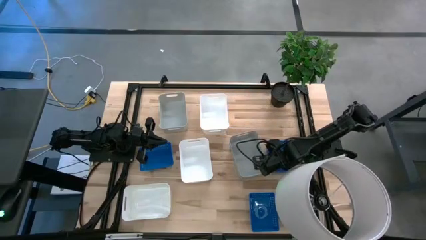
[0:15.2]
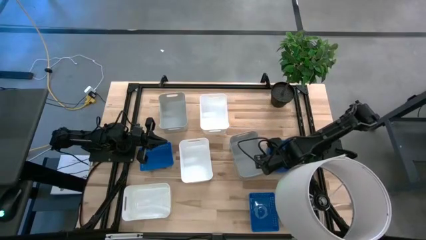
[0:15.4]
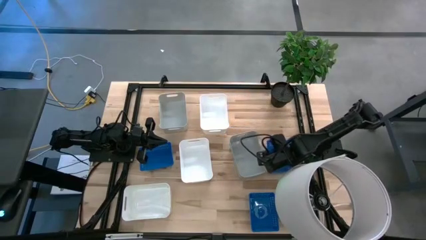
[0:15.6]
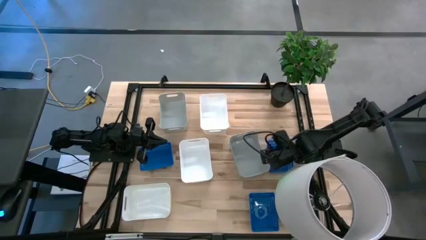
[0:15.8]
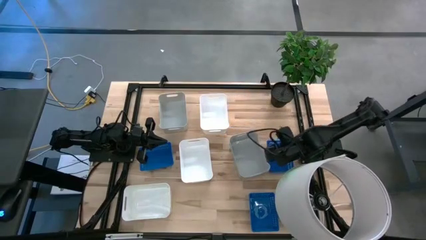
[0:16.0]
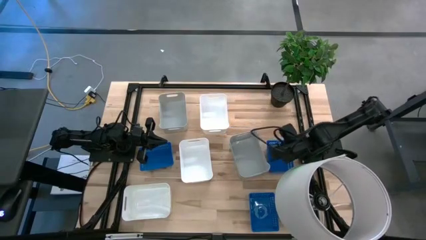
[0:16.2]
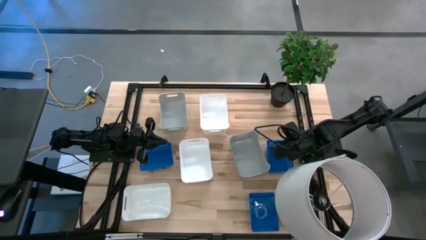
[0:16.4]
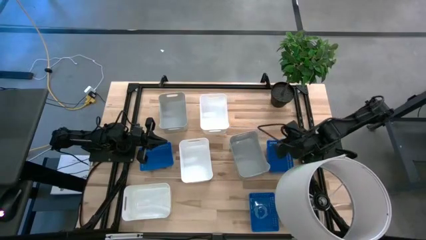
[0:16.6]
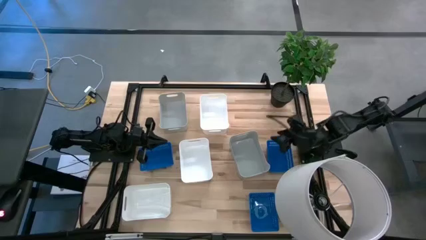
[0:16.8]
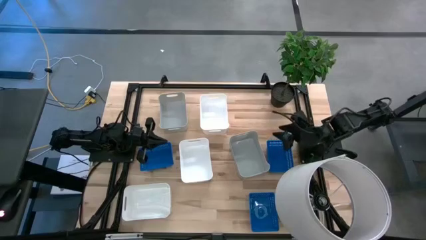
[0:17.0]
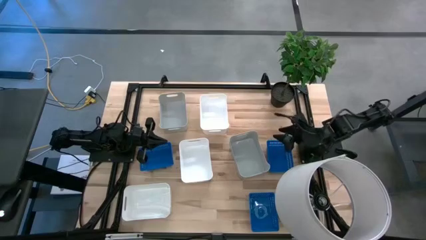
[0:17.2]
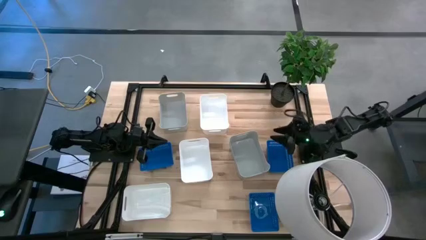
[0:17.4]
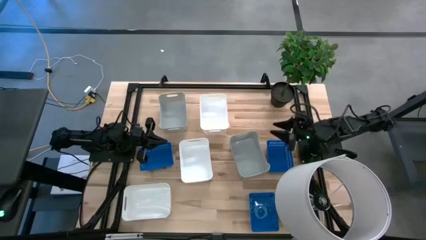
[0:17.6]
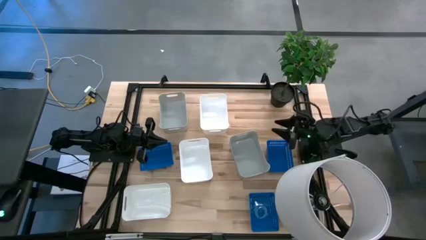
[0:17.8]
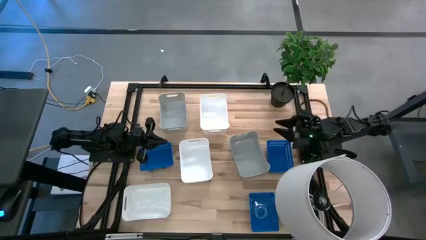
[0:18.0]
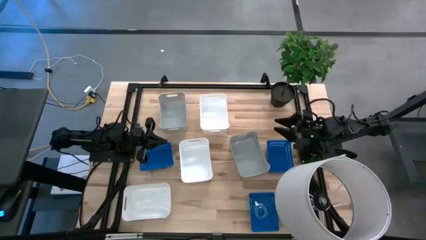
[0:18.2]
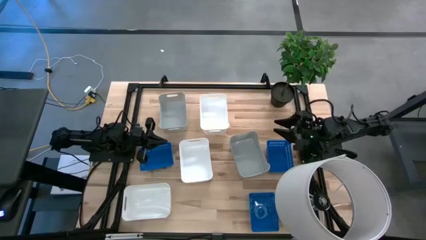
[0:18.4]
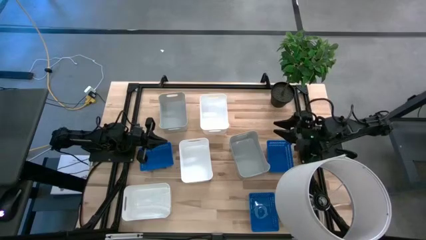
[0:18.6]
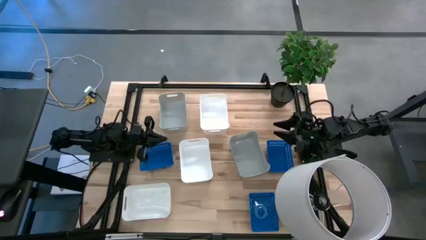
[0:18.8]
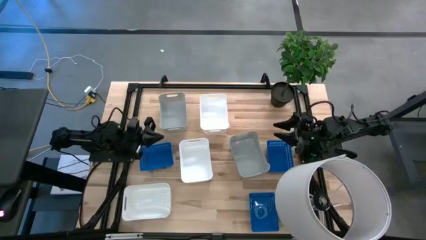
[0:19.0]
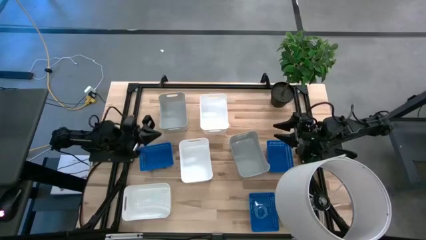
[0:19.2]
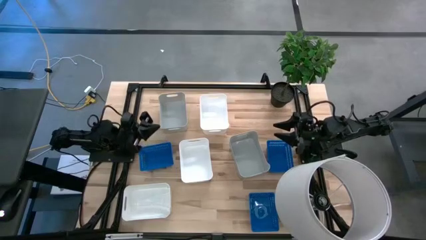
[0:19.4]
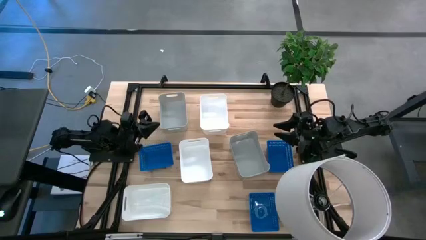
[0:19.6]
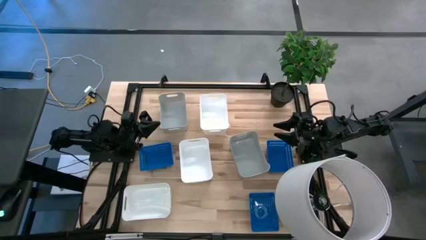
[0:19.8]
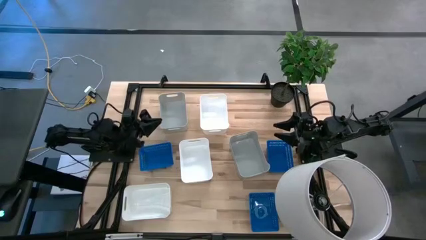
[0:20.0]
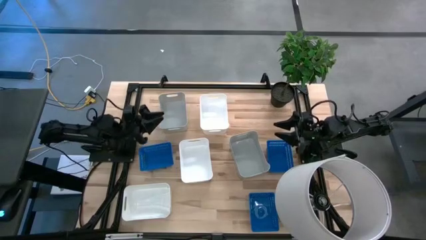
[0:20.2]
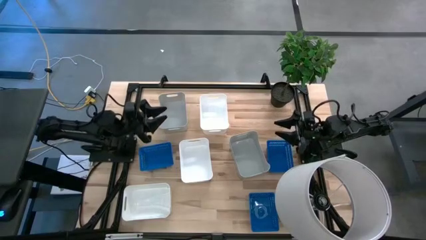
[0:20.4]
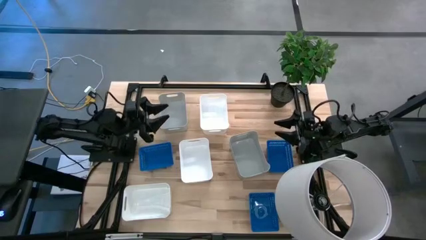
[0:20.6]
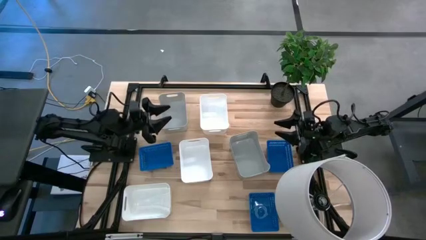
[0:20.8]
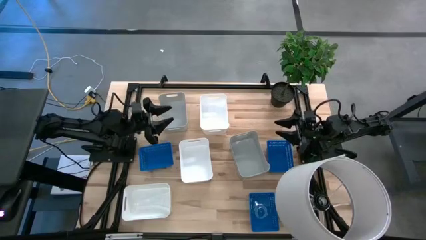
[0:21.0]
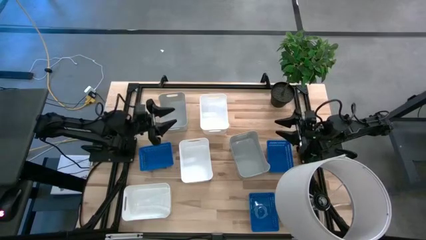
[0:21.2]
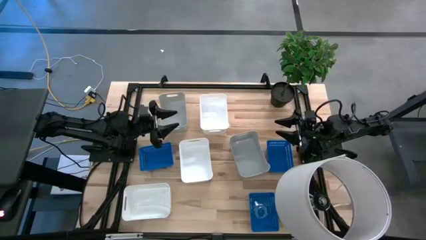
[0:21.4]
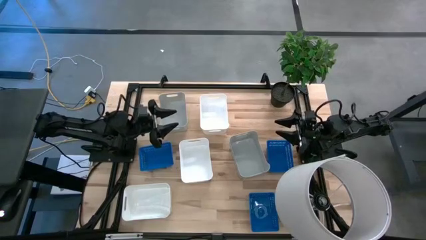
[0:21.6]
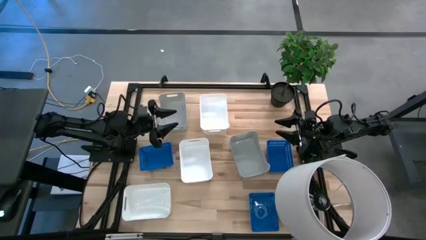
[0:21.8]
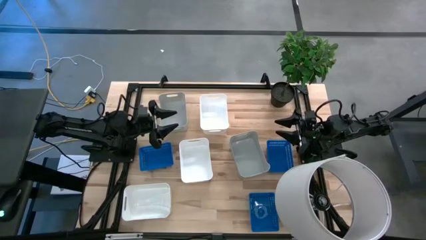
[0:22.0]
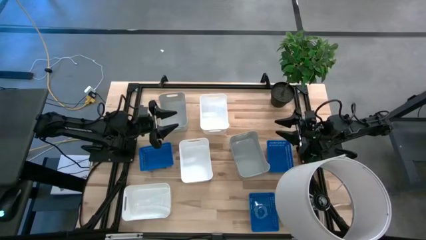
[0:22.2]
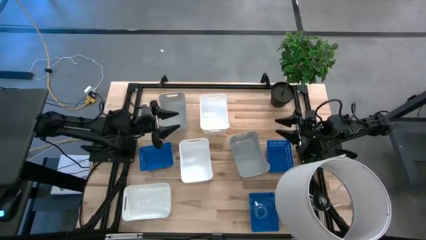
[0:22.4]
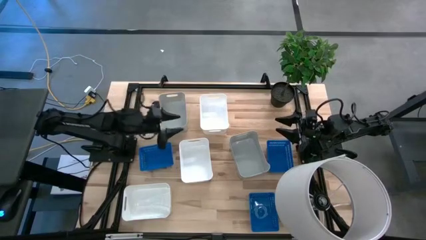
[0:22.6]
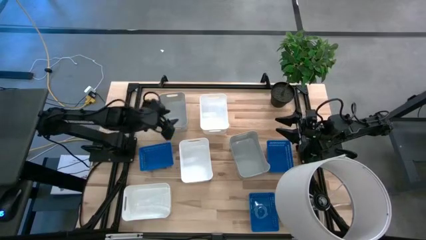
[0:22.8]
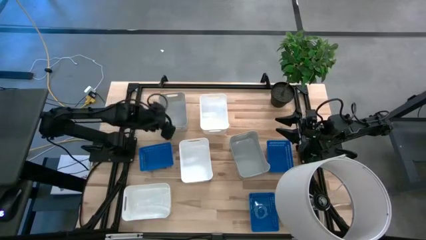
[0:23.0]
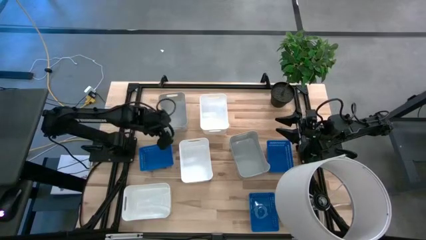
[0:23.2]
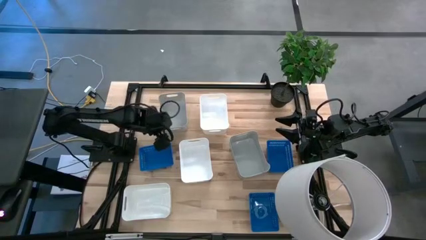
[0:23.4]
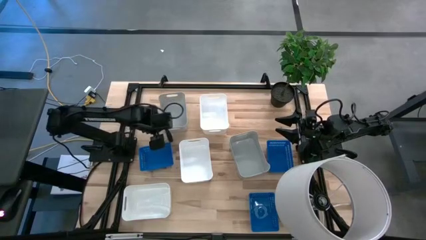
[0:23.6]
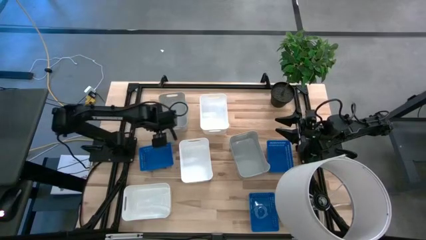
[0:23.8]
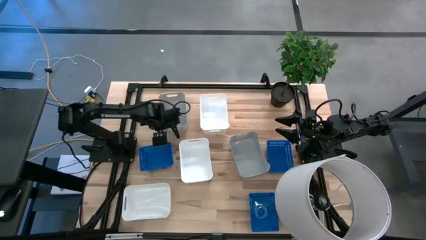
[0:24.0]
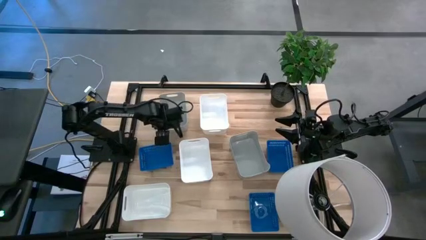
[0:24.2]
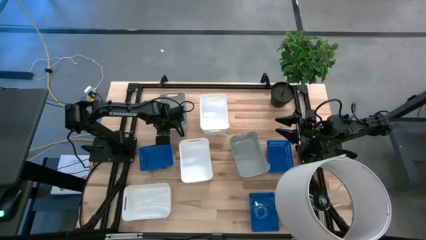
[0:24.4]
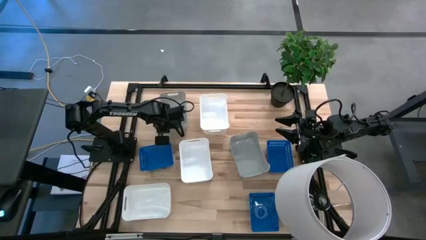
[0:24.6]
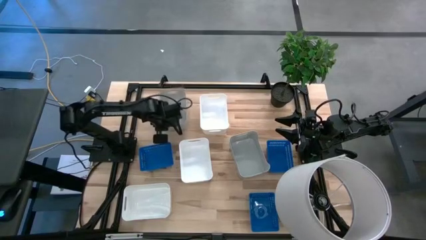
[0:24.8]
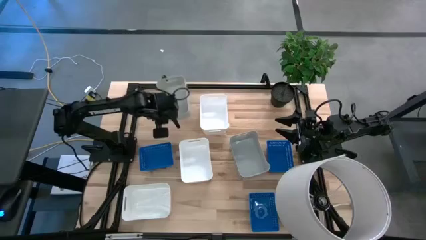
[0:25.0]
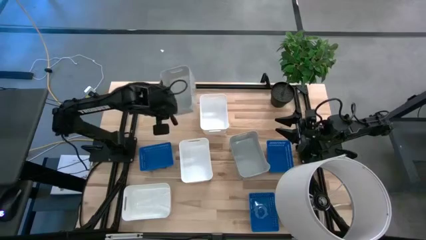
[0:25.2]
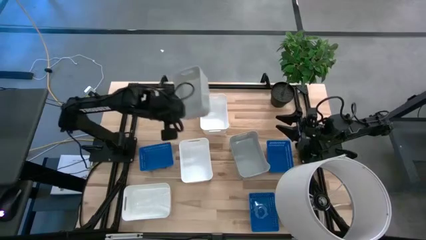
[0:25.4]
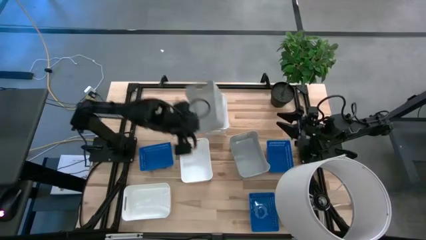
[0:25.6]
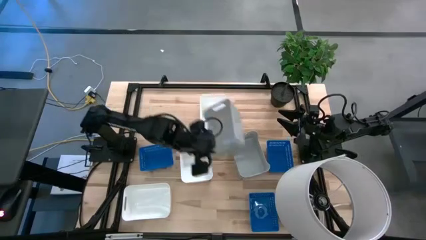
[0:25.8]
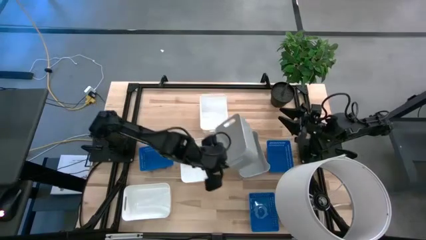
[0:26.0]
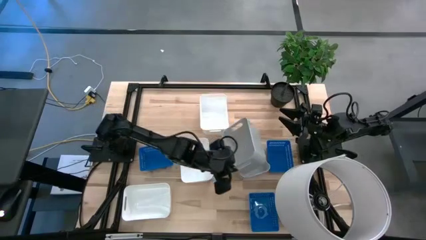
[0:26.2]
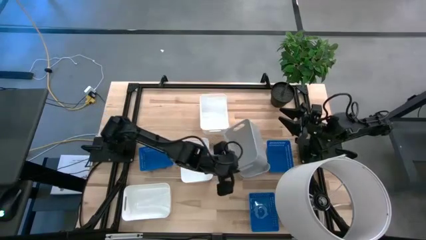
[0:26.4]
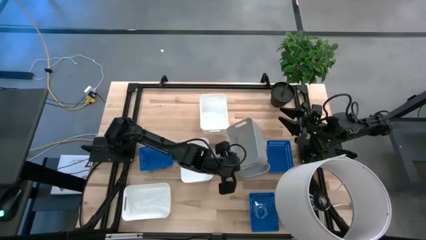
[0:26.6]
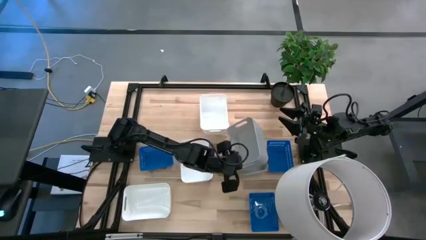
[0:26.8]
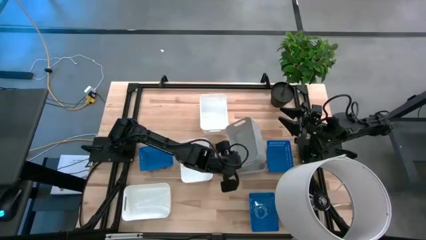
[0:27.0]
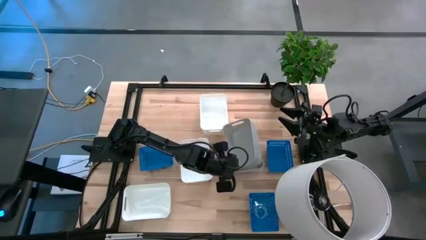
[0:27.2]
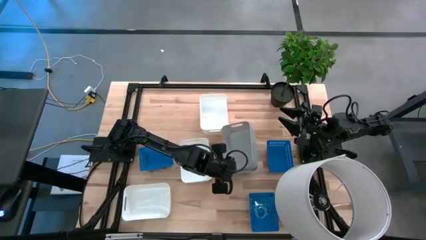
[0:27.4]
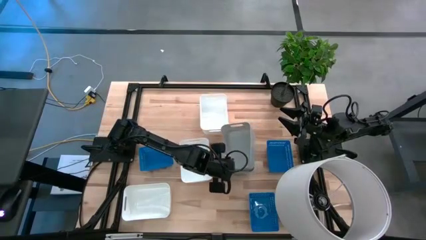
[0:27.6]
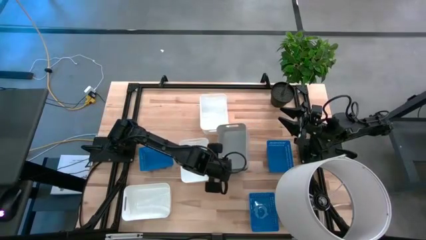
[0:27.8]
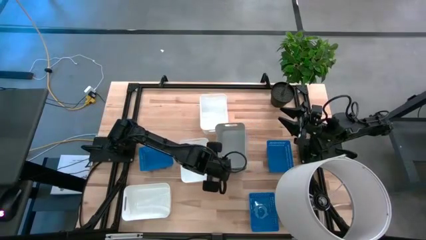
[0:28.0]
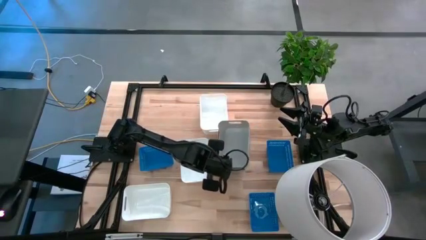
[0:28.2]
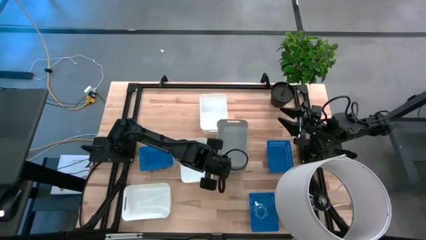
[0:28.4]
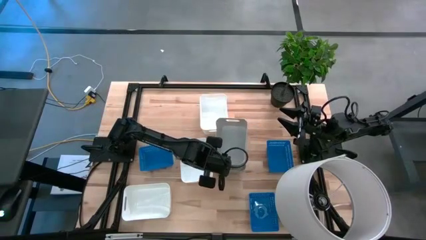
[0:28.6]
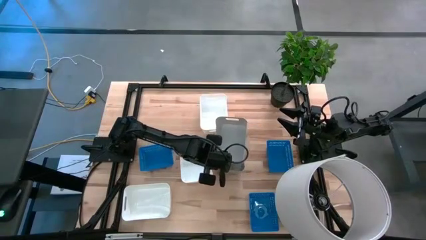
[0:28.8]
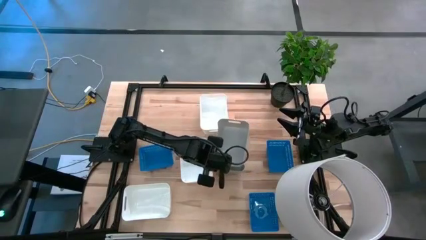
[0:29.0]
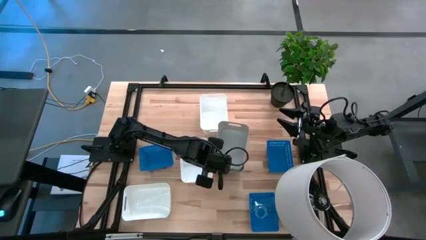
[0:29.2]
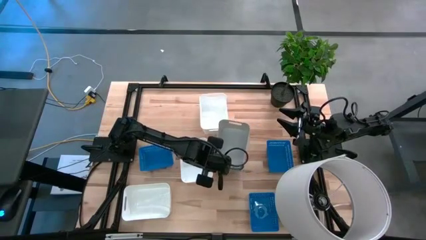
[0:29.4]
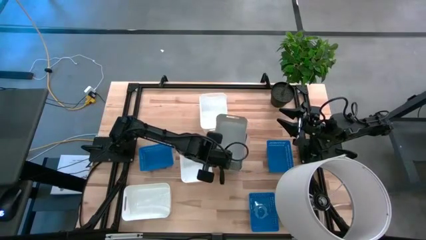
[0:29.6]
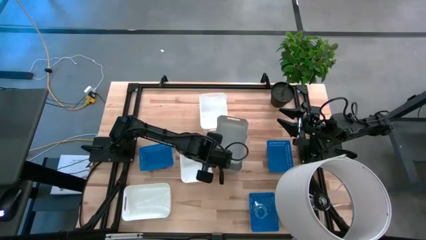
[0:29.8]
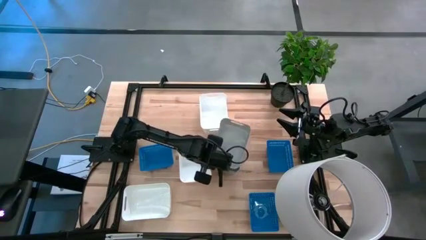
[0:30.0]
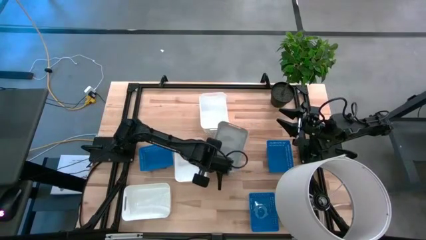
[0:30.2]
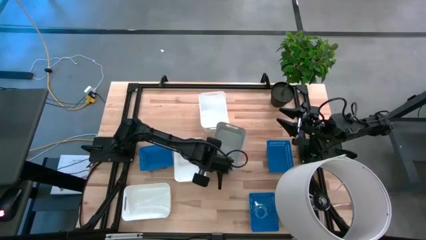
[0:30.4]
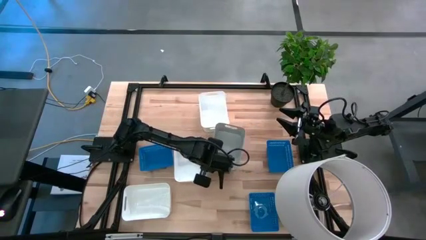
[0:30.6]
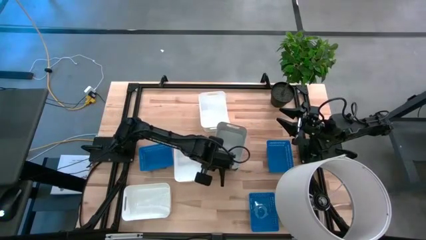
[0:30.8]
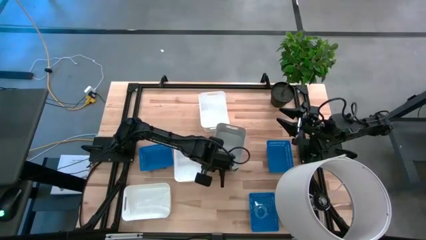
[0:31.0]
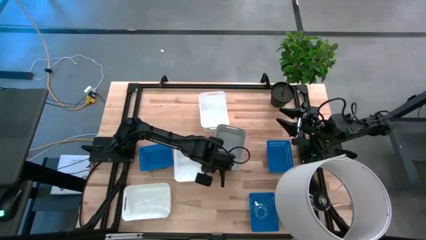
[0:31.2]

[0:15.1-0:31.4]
Stack the gray bin on top of the other bottom gray bins
